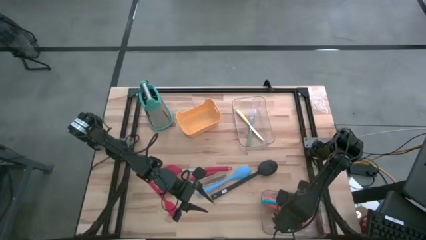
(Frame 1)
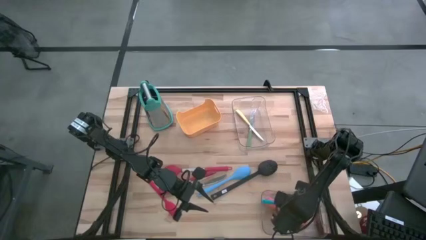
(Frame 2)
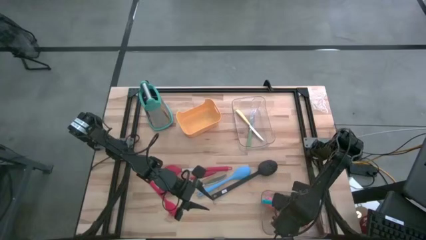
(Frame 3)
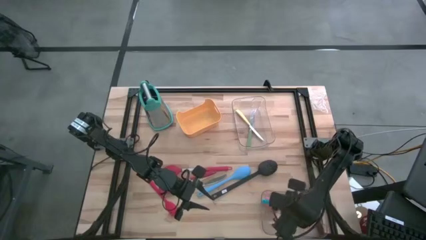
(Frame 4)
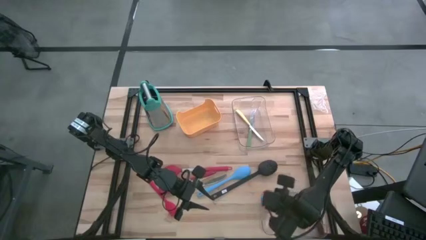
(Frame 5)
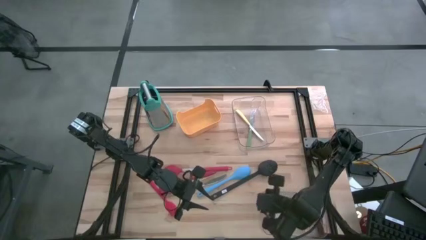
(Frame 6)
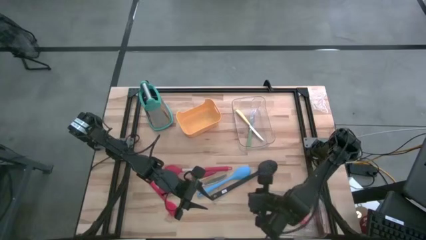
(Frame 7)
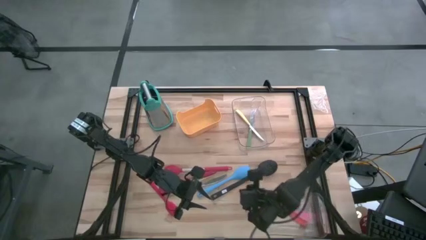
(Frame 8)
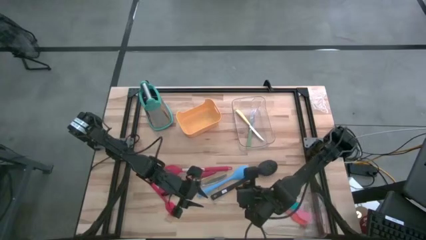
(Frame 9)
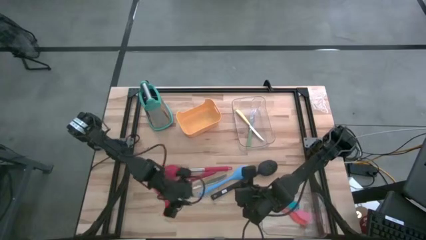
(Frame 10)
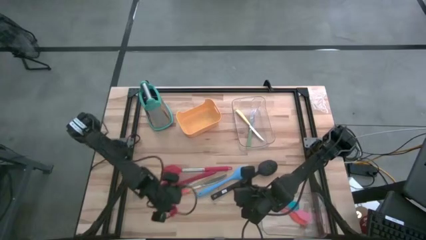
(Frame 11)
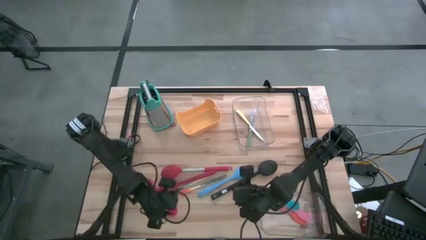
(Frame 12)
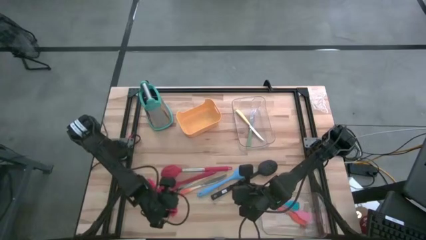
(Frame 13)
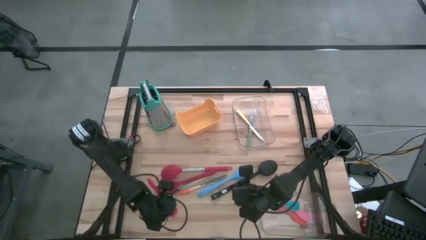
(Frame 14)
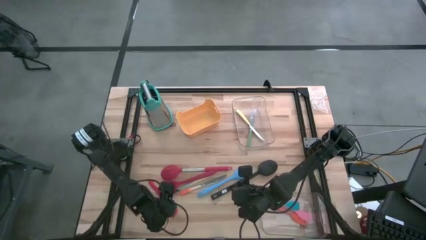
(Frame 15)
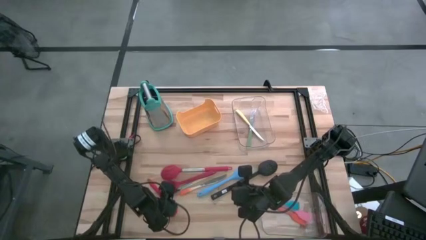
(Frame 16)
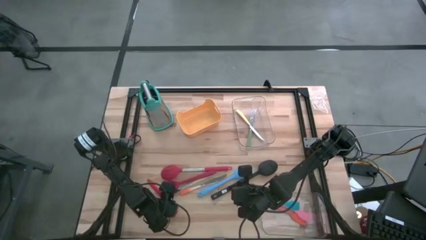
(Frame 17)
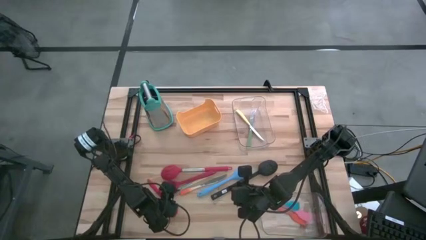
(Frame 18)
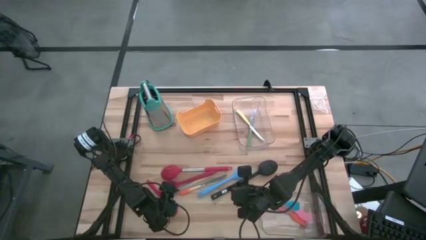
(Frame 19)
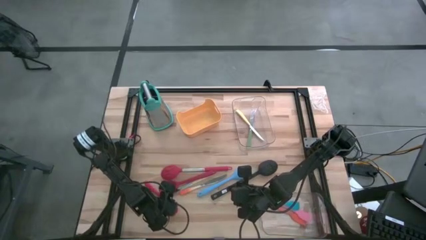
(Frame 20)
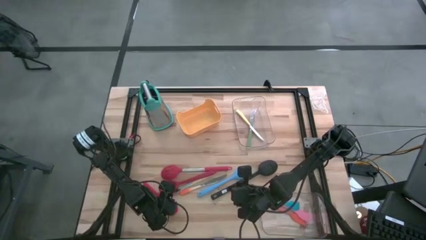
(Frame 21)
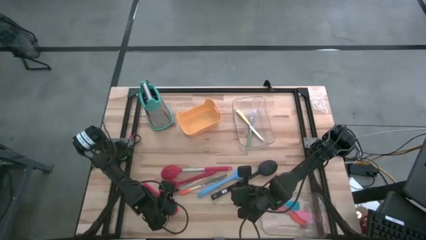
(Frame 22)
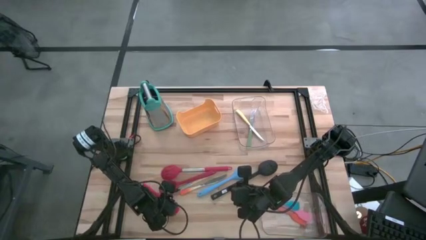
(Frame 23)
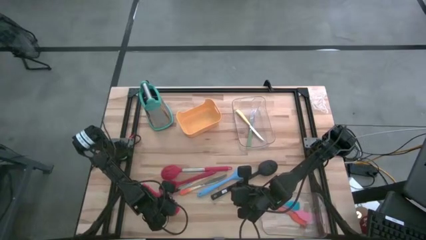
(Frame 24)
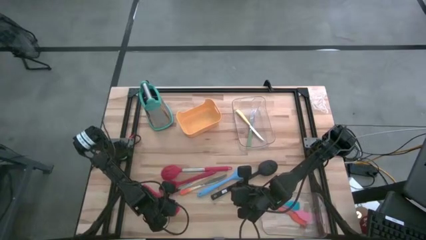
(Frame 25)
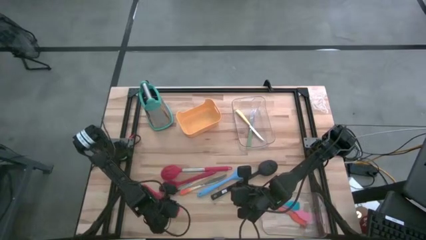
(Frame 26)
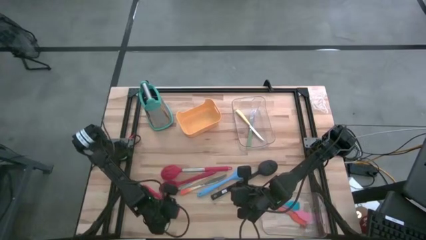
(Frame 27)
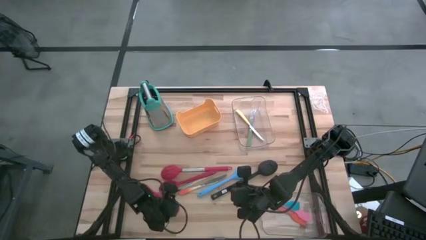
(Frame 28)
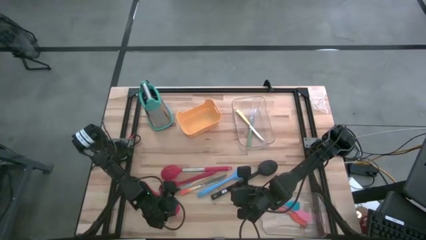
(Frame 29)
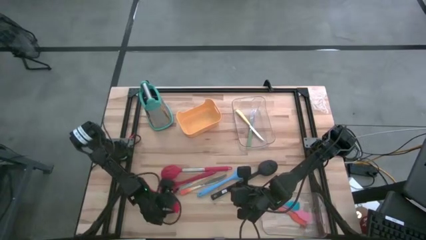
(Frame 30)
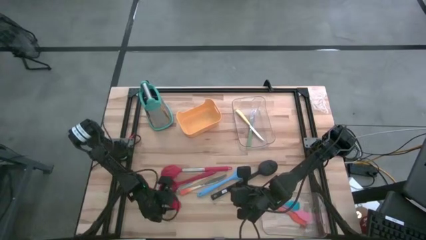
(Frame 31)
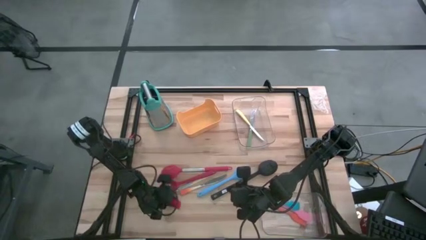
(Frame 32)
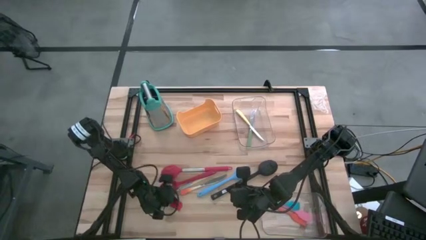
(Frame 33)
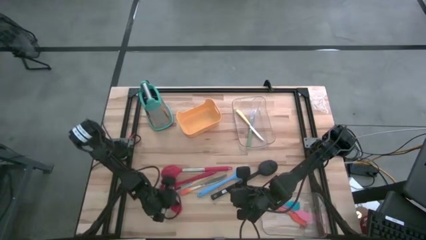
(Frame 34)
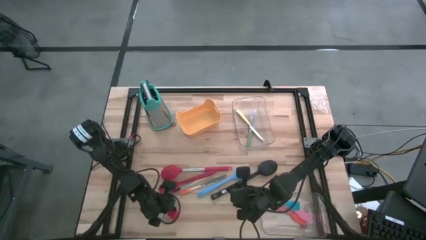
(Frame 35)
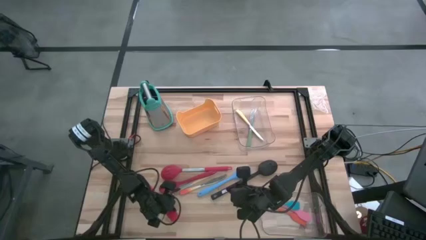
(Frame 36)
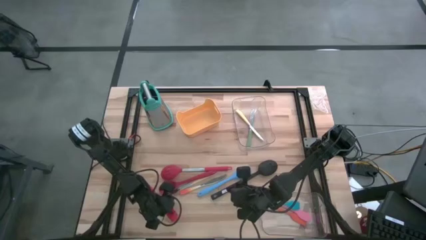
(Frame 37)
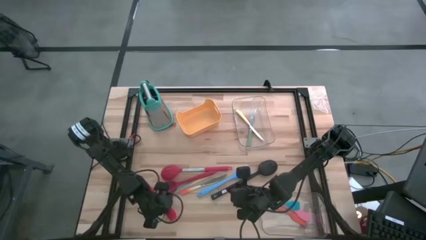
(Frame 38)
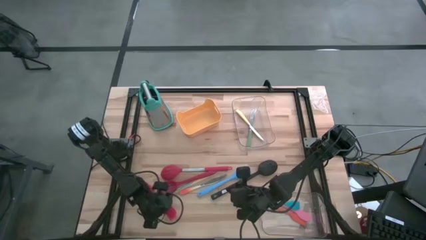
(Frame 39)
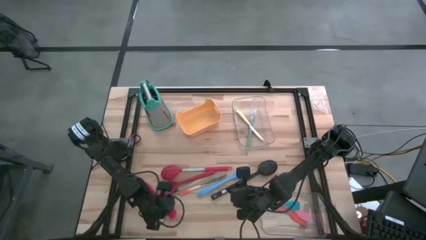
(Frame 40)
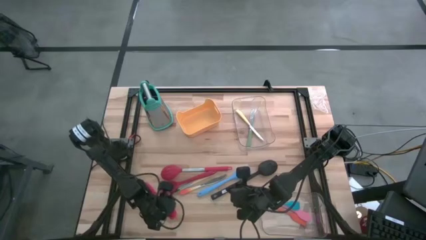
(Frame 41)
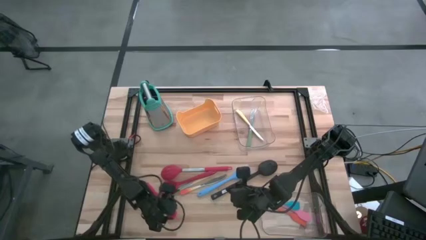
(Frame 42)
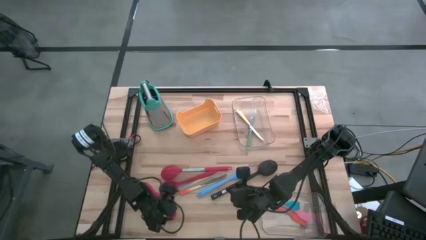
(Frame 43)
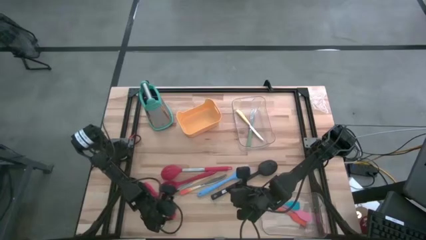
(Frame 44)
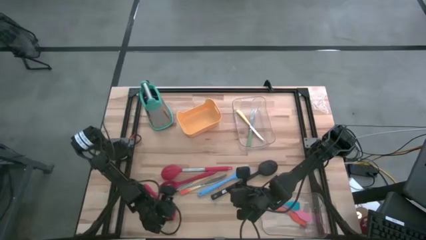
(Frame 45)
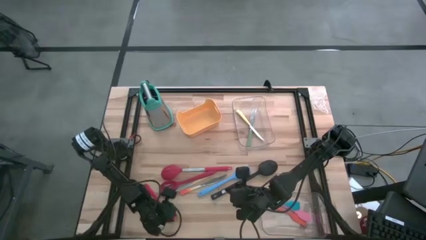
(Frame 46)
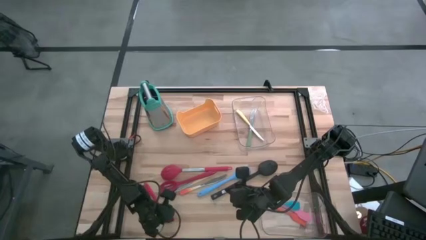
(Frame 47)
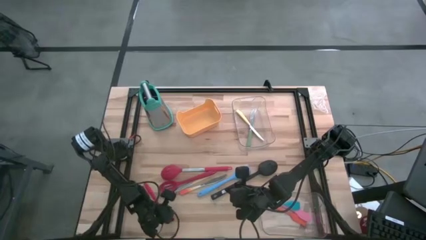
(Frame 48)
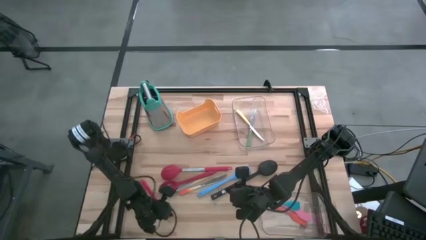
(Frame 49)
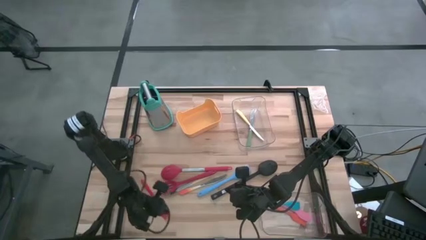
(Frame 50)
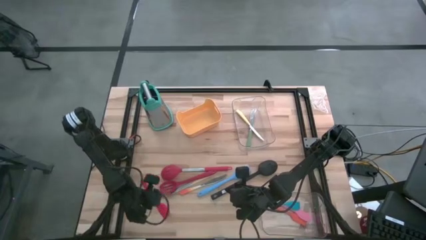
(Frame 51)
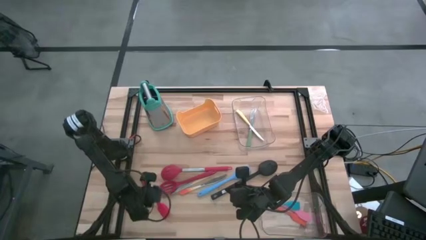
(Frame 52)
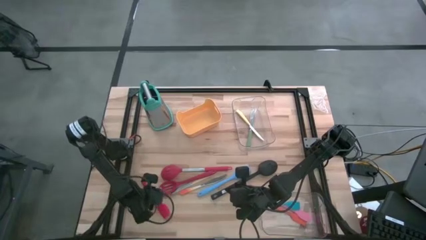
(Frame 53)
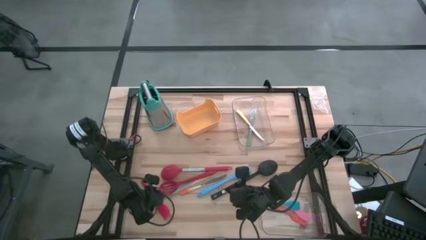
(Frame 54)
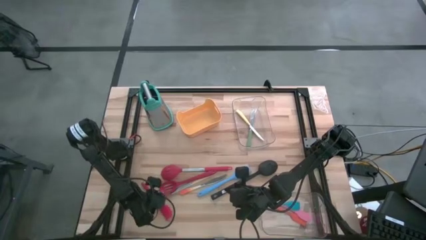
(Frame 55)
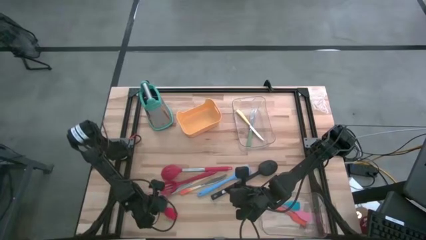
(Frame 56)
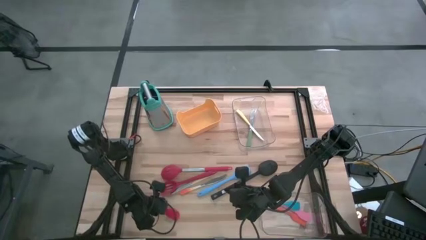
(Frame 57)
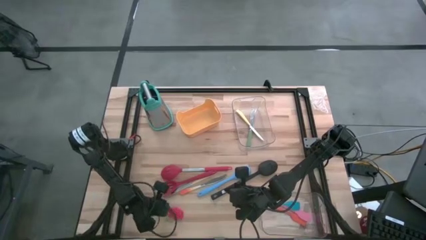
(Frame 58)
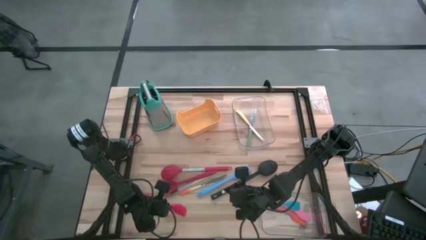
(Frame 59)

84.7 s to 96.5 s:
Task: Pick & Place Kitchen Items
Put the red spatula into the bottom transparent bin

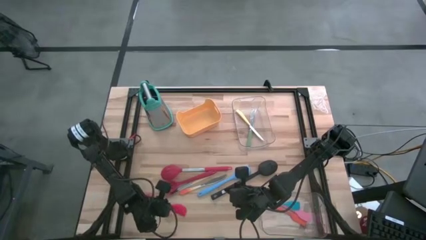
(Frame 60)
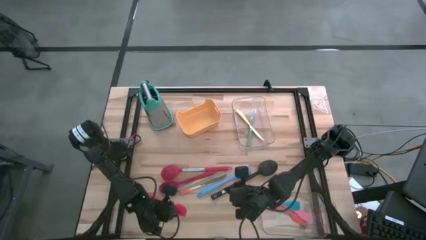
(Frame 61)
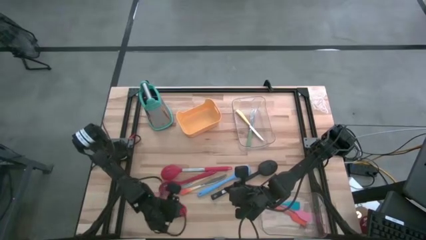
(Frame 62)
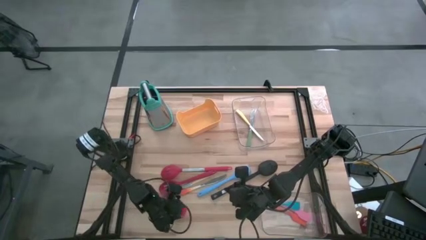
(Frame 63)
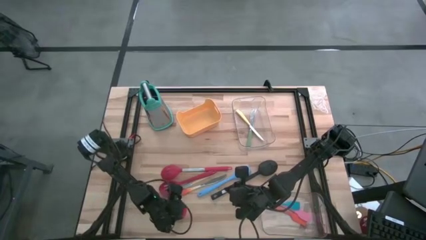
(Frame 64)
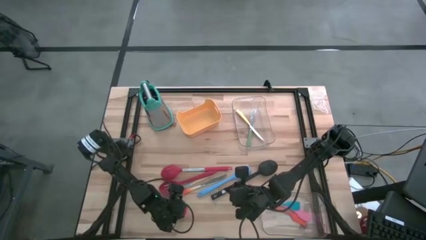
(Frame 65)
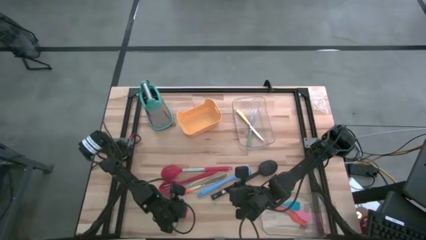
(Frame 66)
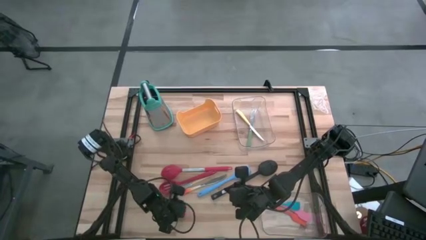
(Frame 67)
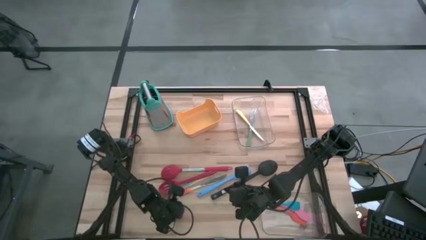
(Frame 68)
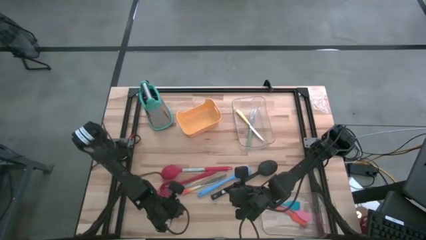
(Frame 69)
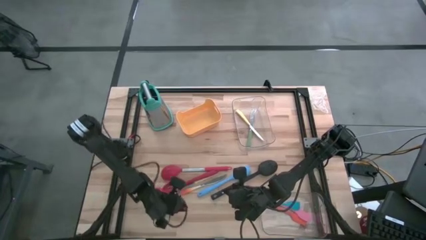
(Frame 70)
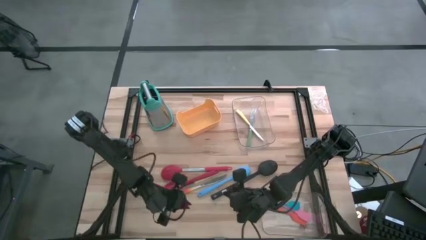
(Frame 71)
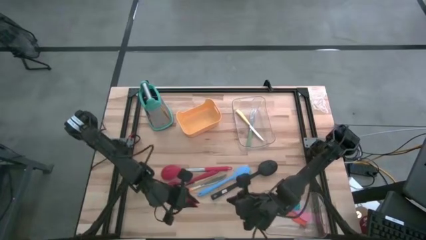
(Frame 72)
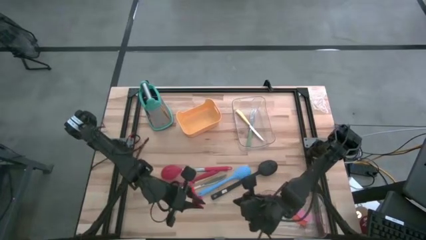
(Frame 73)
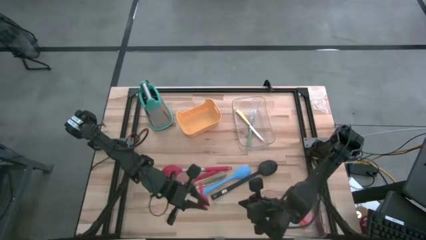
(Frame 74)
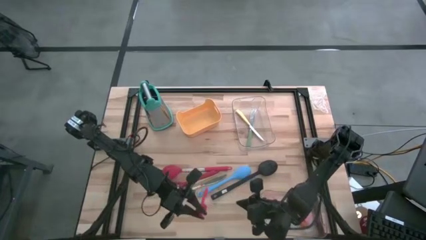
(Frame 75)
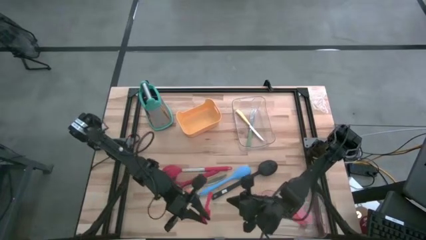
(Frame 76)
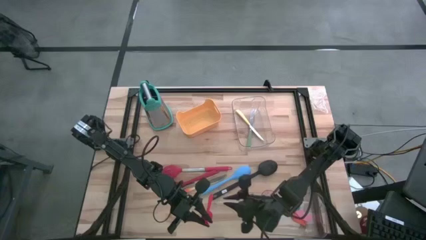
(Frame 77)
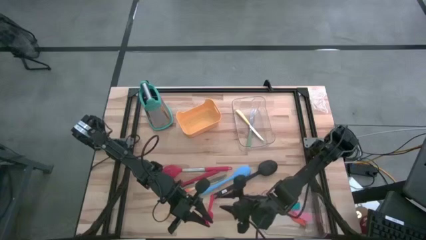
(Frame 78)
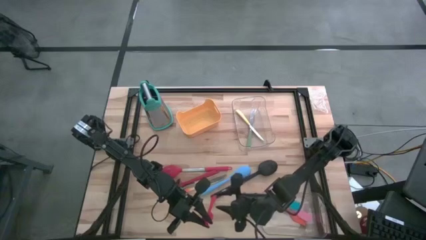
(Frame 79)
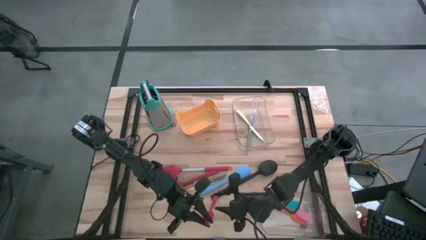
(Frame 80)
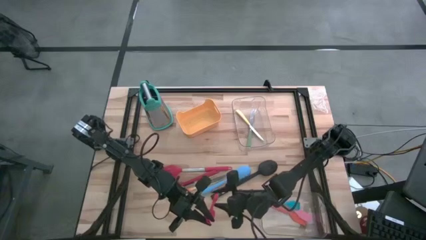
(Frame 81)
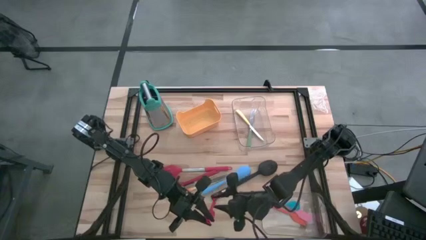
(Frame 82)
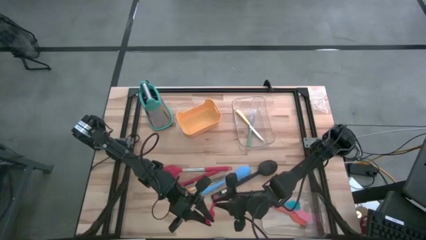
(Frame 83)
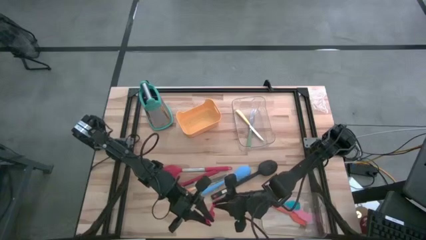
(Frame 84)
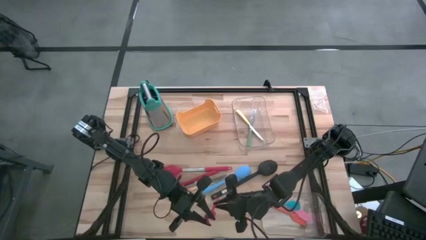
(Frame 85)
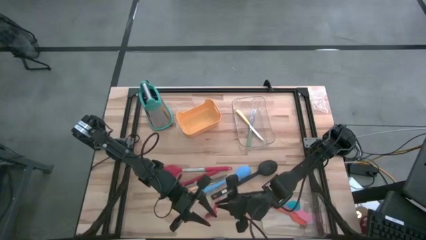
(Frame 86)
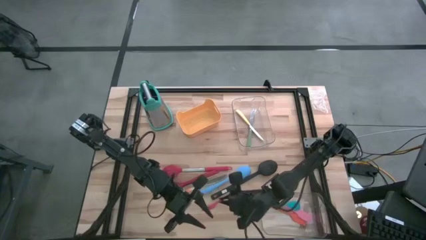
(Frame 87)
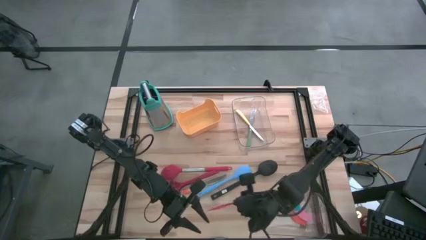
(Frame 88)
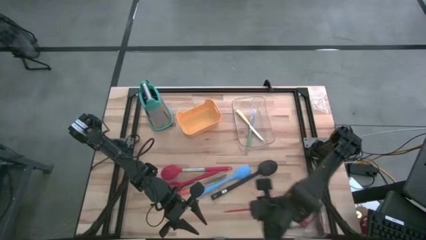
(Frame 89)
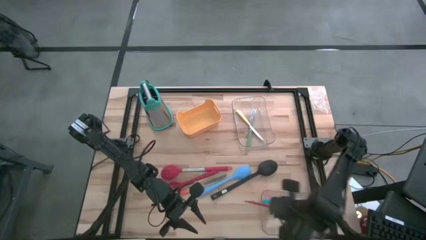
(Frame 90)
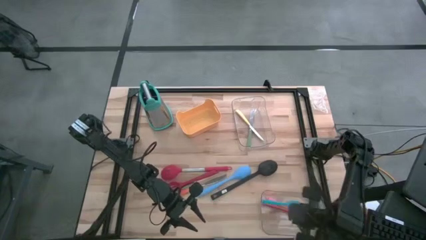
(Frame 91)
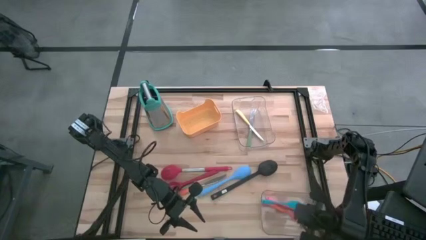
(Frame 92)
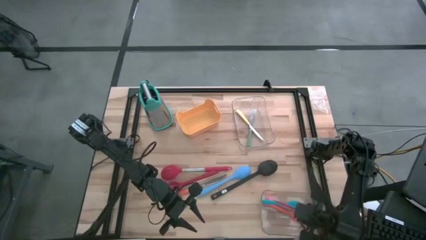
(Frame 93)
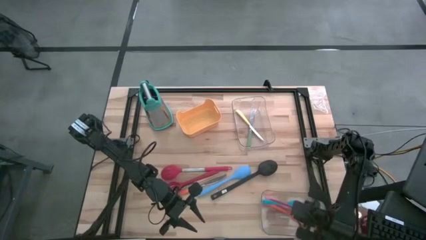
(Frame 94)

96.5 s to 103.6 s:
Put the red spatula into the bottom transparent bin
